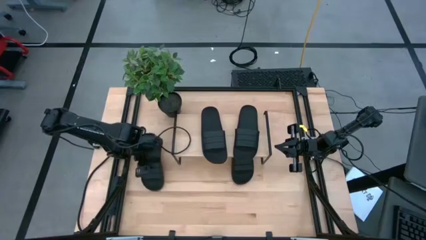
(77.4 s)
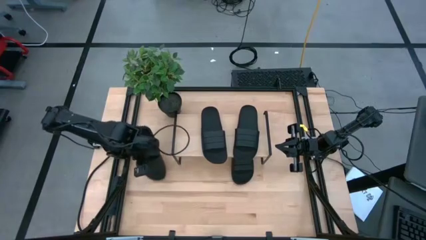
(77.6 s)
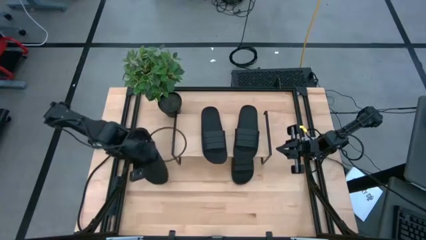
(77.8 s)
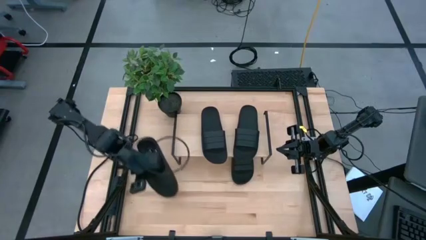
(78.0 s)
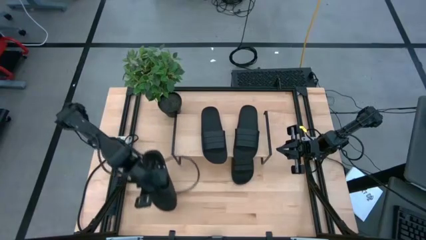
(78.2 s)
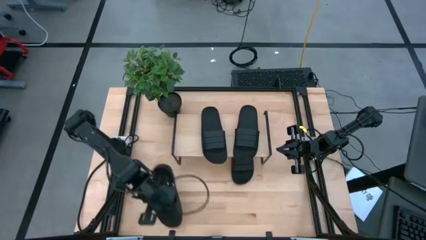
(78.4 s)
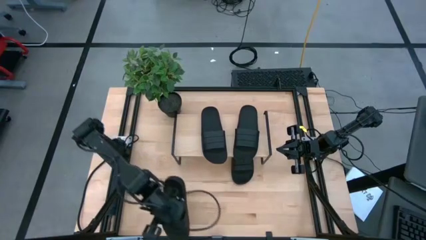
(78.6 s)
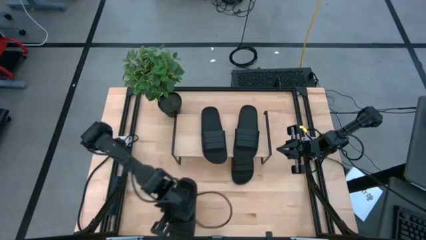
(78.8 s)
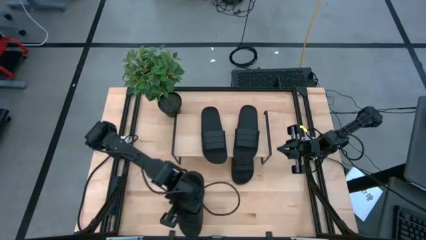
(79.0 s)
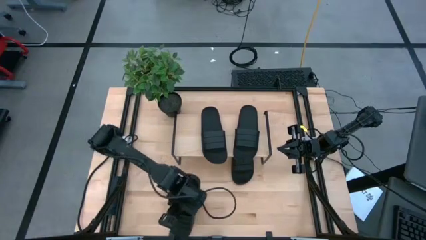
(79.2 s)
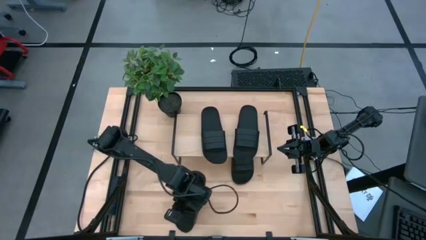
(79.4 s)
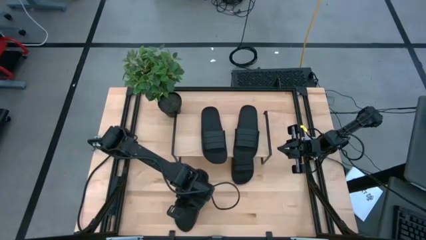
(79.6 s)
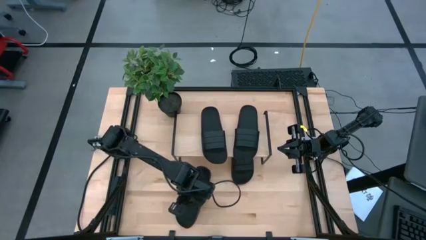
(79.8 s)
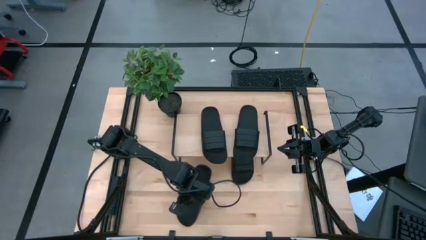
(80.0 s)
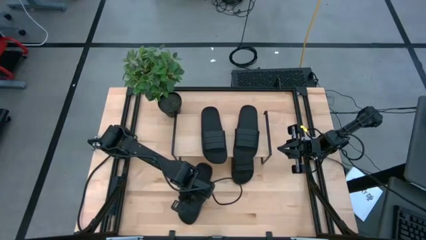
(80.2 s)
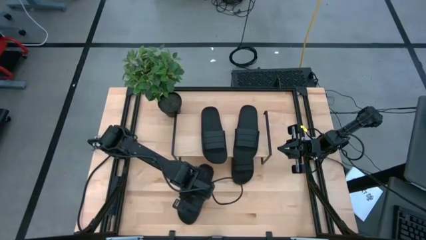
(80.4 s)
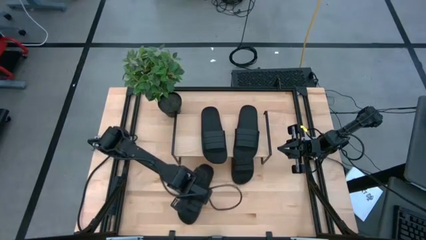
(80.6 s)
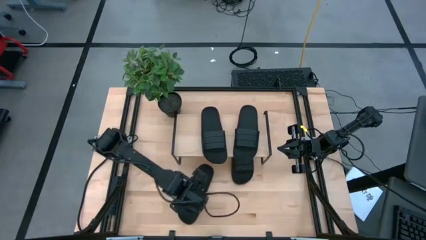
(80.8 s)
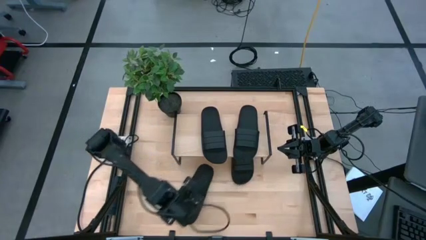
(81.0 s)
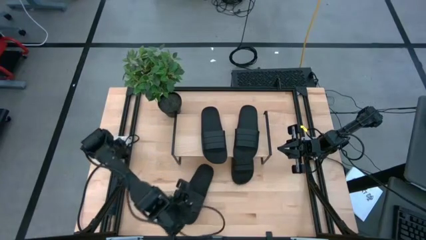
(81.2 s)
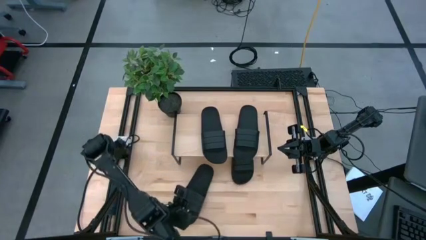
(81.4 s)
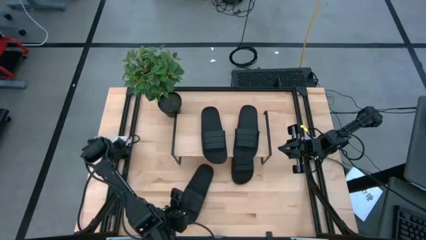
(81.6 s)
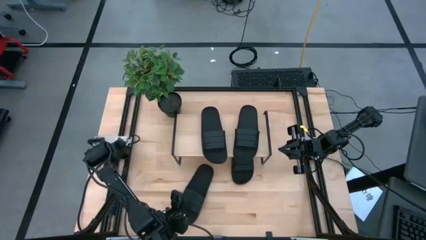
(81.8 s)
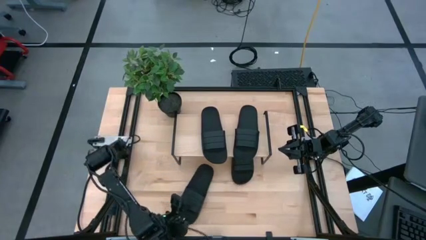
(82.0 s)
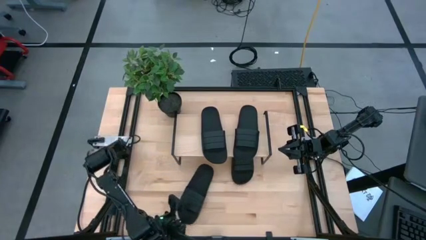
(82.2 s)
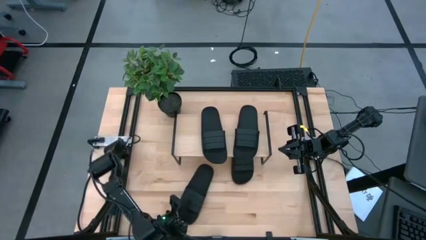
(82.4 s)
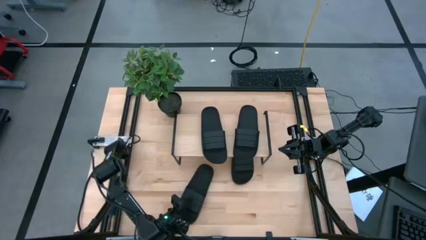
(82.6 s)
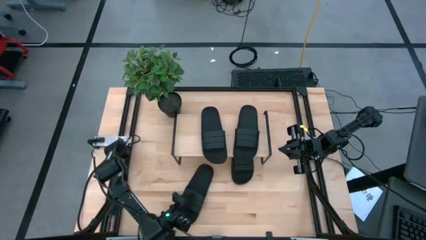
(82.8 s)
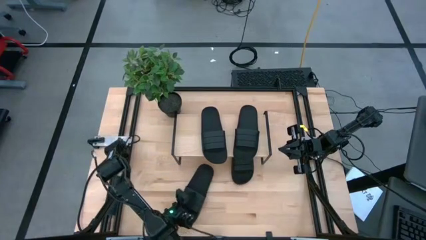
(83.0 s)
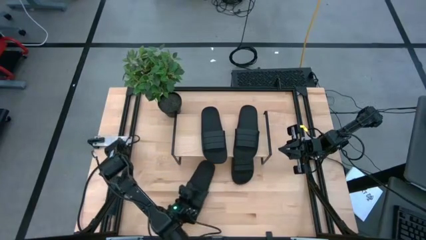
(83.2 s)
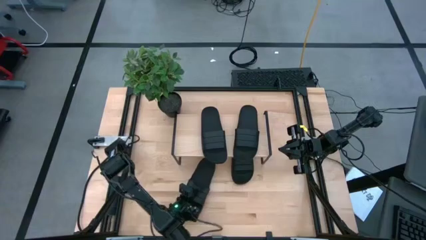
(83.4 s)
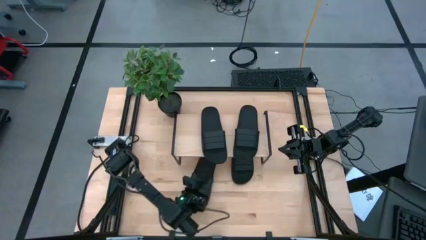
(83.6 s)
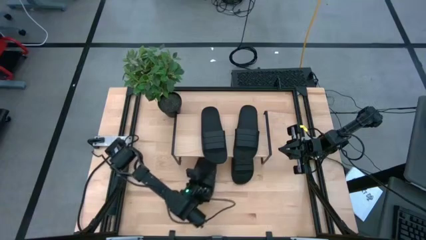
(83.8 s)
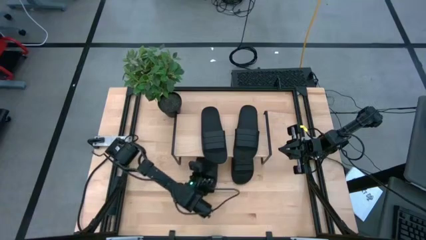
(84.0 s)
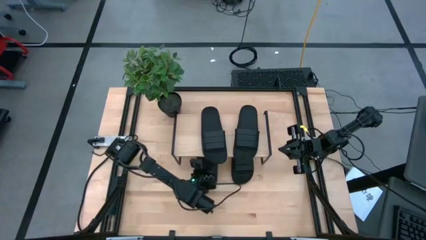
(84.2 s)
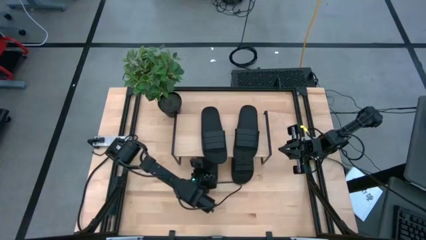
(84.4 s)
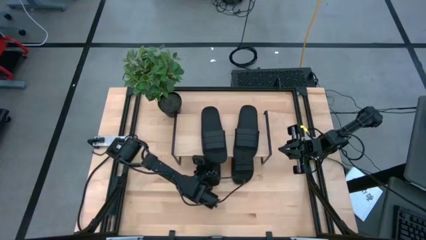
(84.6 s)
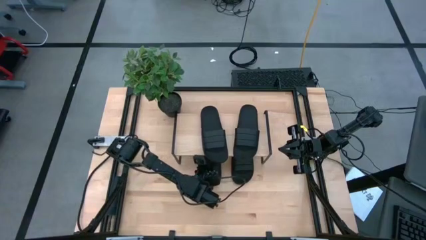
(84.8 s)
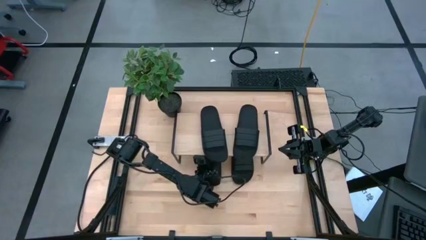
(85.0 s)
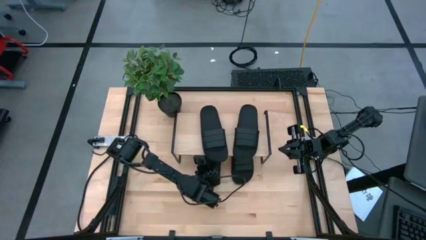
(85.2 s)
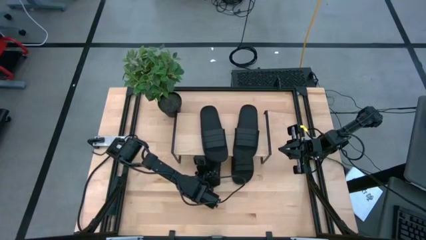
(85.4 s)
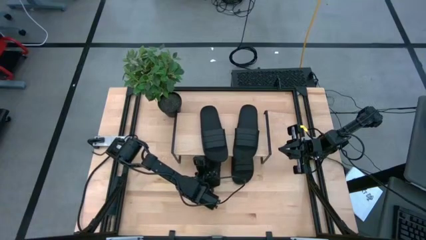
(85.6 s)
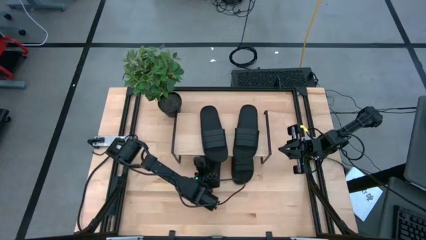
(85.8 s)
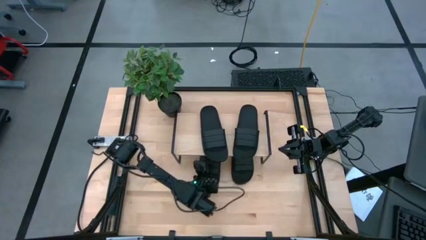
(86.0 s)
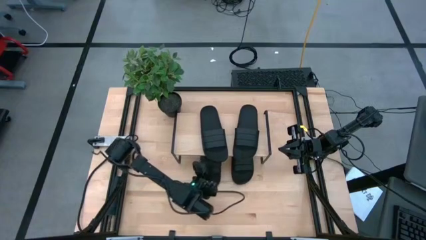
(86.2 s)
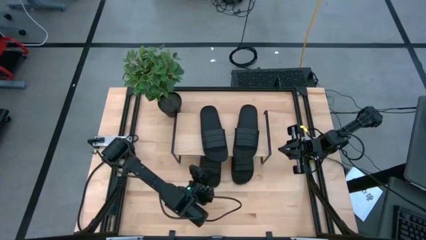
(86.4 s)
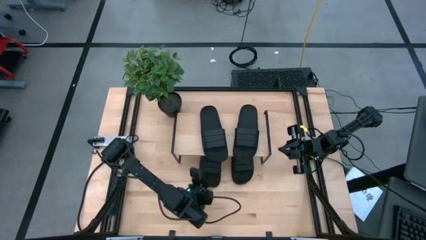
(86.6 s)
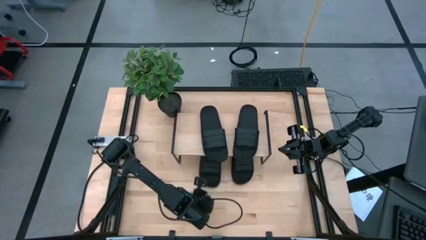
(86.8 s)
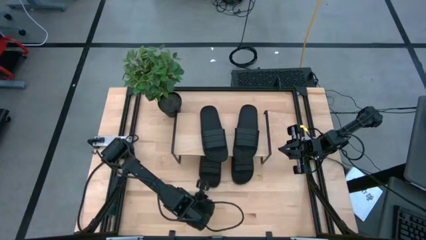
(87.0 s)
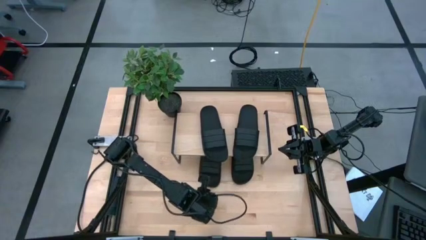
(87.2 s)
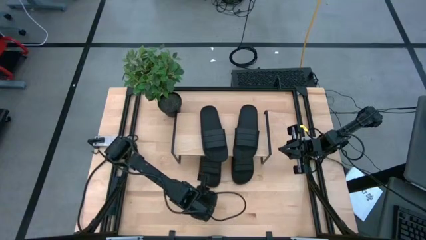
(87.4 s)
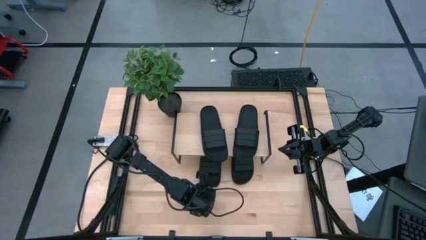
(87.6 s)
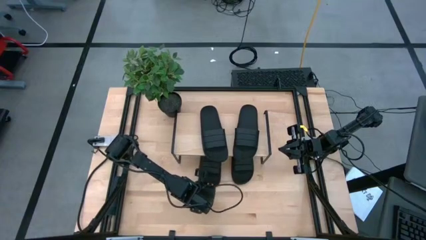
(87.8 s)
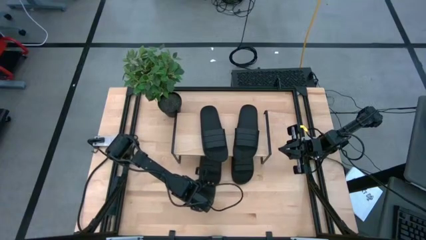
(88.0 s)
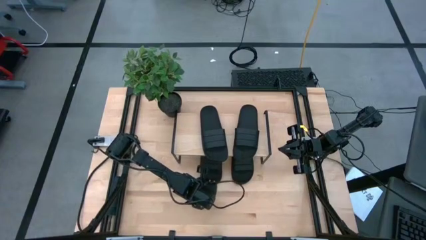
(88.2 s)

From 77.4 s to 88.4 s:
Task: Pick and place slides into the shelf
Put the black slide under the shelf

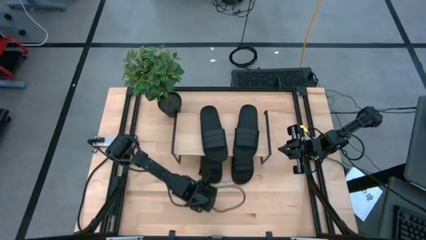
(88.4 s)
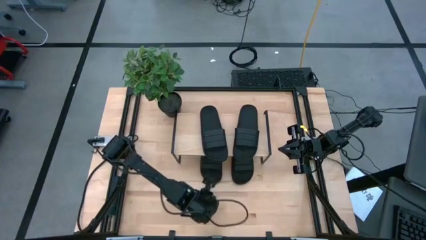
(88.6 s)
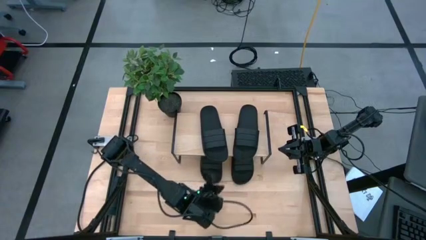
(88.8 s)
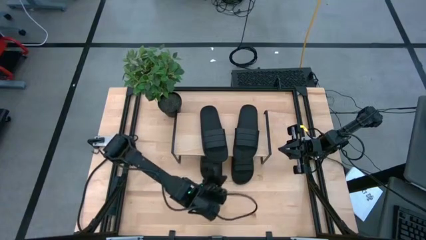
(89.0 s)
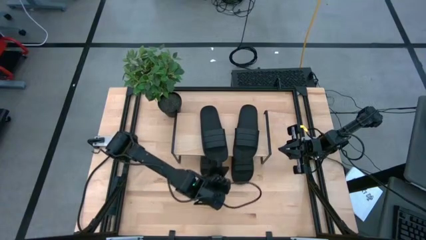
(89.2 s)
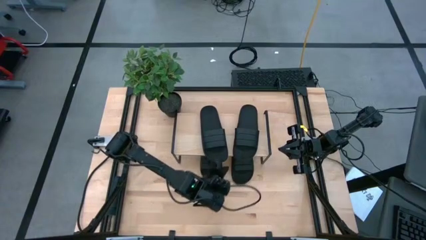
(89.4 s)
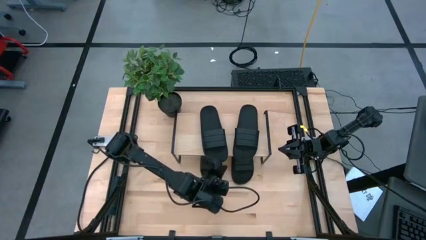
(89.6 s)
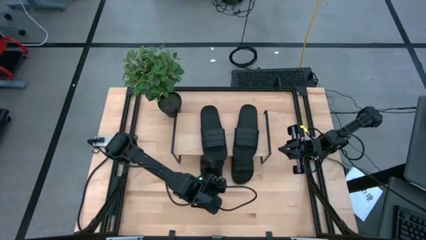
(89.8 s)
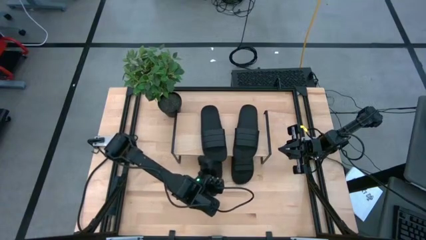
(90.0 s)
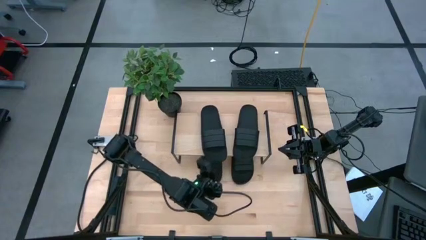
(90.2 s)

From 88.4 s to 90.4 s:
Adjust the top left black slide on the shelf

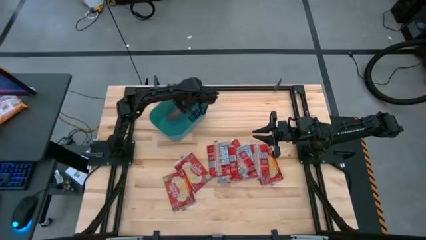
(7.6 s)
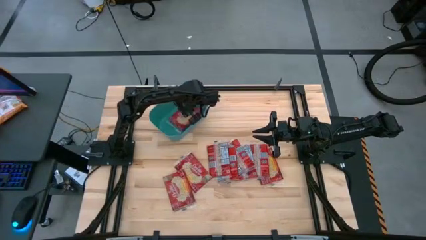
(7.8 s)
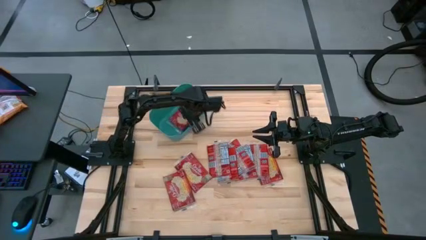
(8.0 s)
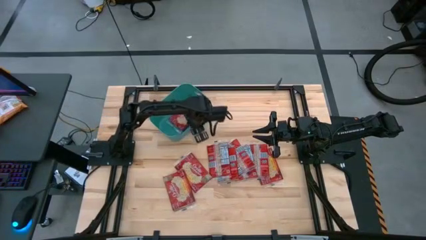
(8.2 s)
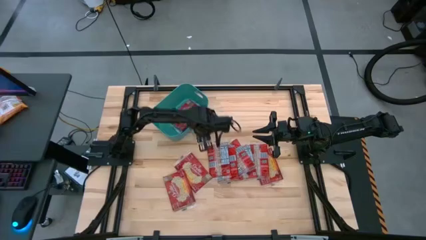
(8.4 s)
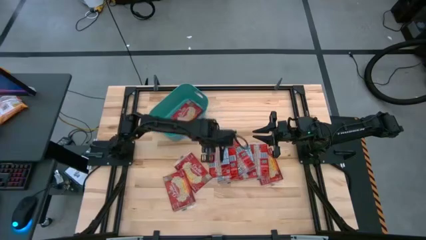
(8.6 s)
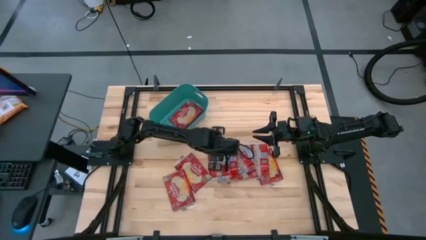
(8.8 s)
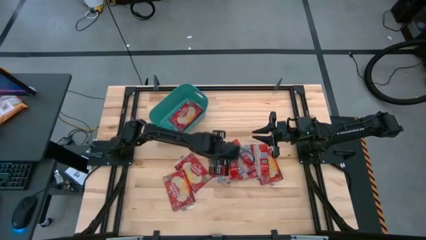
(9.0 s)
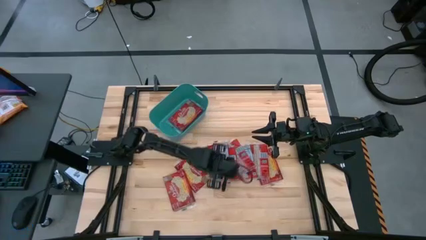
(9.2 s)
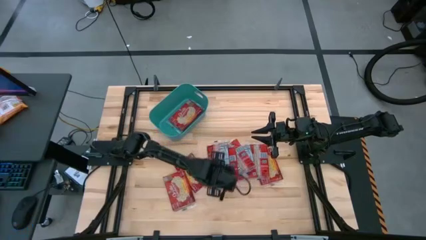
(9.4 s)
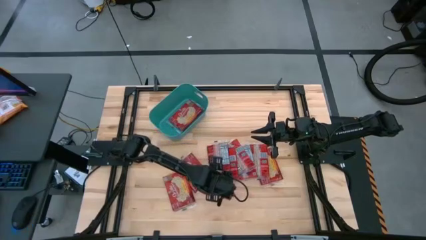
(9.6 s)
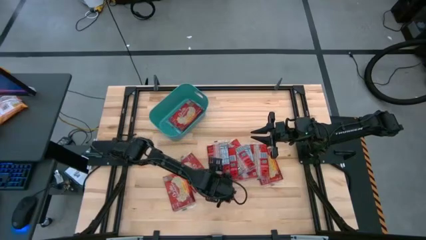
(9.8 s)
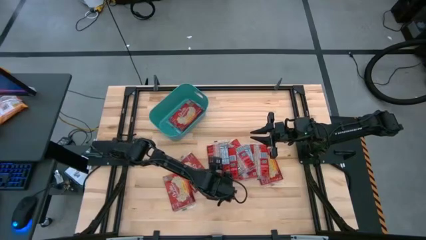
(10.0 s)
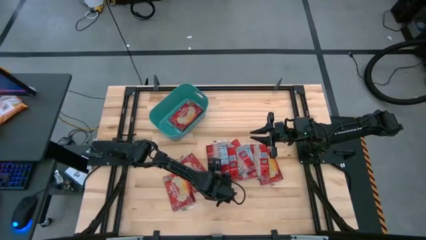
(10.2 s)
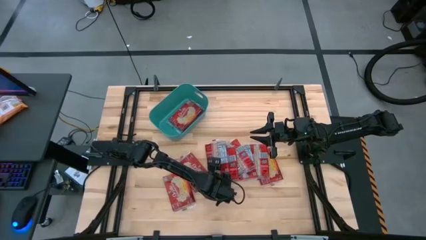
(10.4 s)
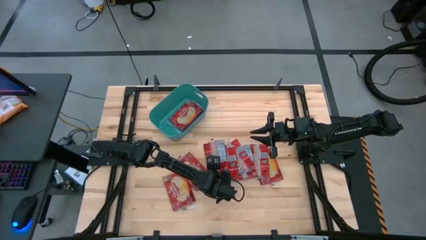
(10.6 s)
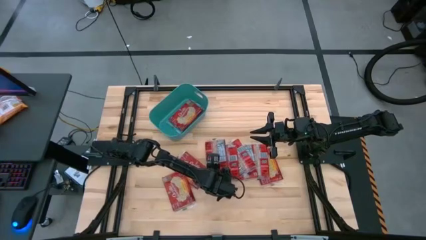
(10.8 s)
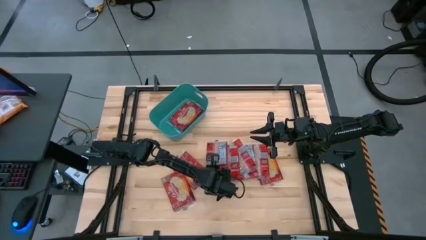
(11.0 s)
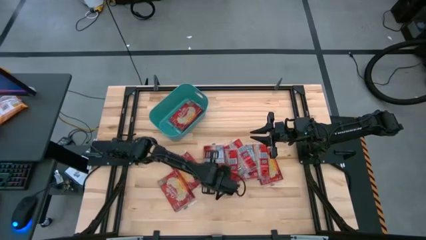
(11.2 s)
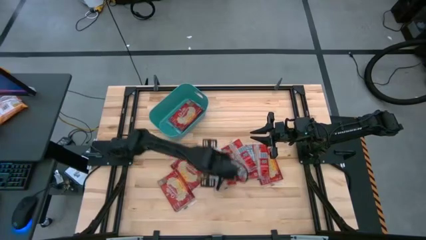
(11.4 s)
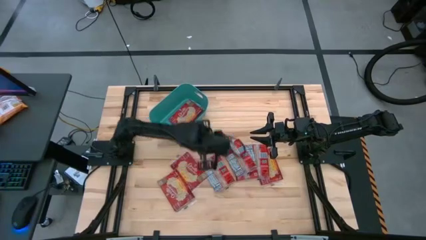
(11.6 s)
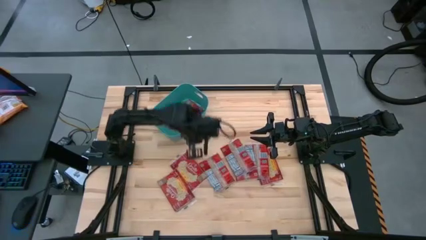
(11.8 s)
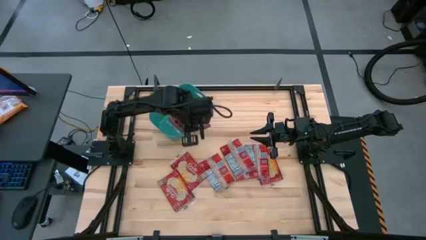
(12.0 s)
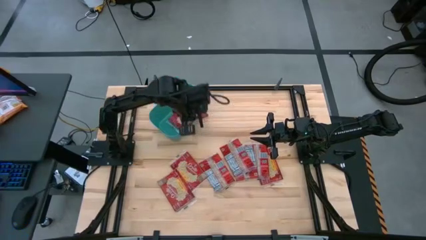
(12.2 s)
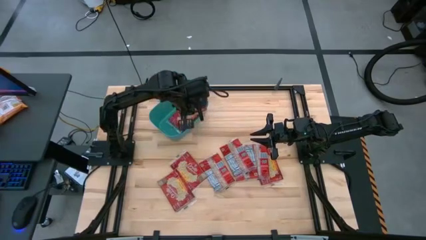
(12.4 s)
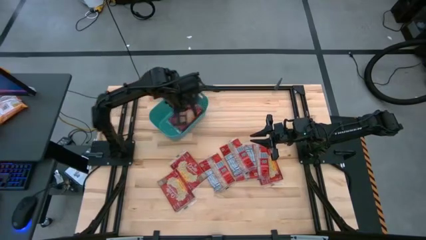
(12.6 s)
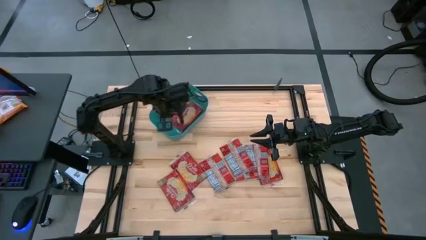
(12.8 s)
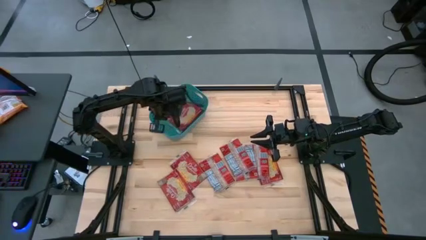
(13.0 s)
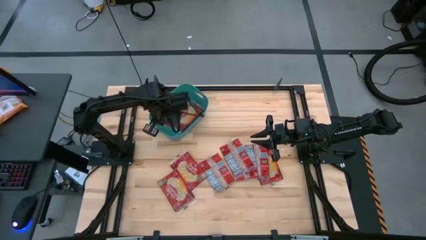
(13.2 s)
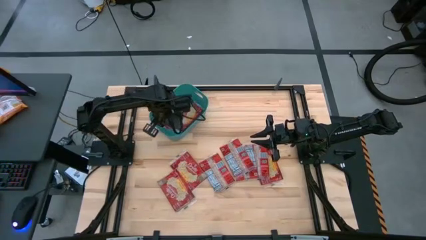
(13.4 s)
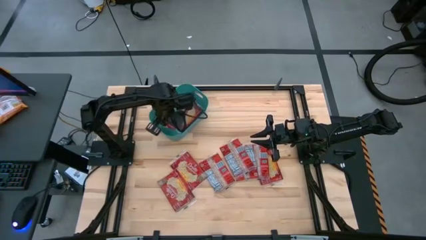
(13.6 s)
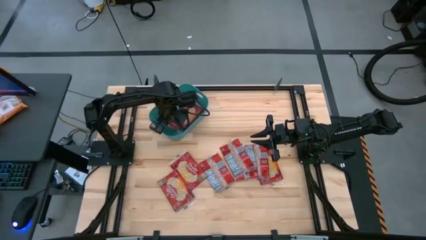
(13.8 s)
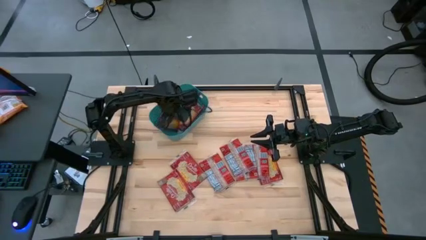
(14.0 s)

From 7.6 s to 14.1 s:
Task: Sort popcorn bags into baskets
Put the red popcorn bag into the blue bin
